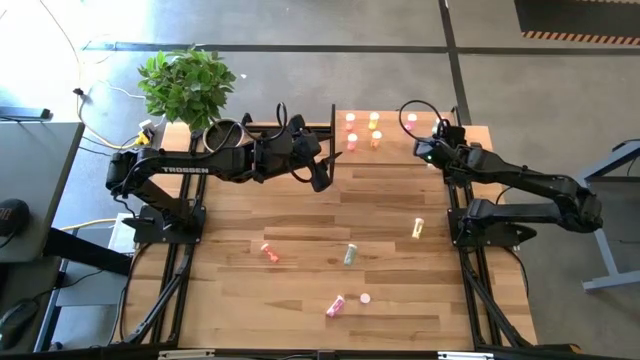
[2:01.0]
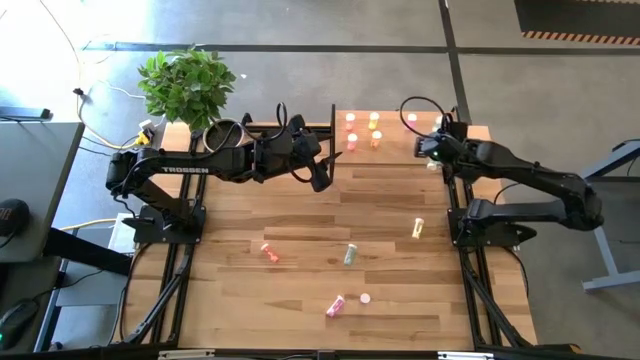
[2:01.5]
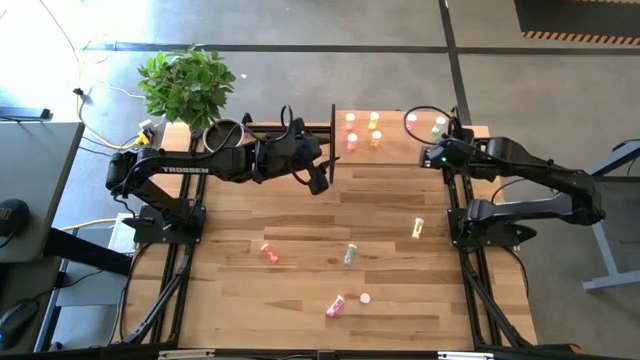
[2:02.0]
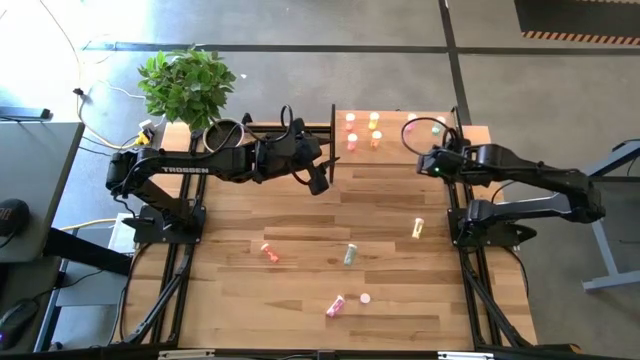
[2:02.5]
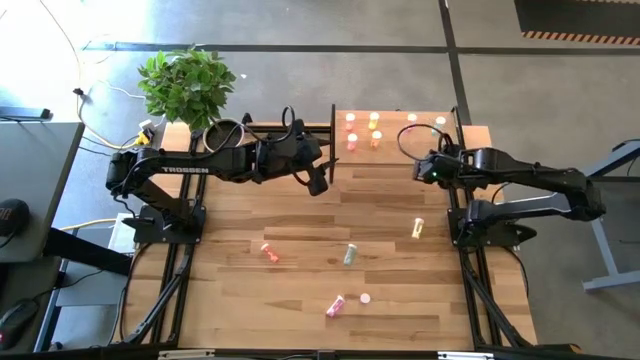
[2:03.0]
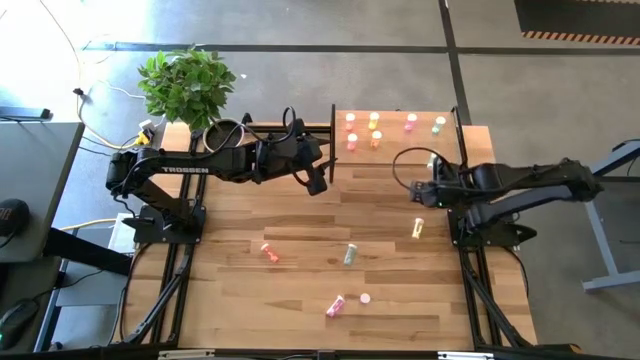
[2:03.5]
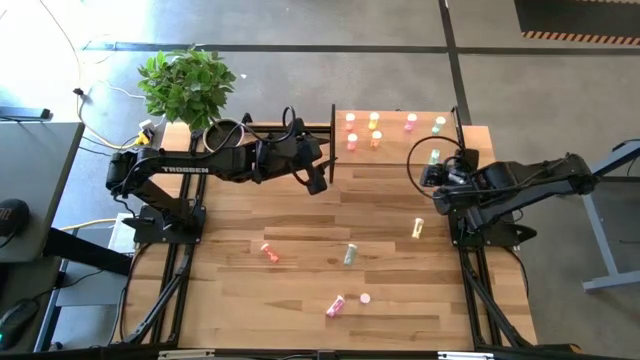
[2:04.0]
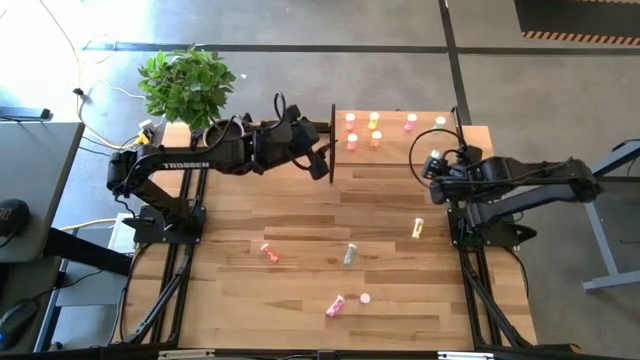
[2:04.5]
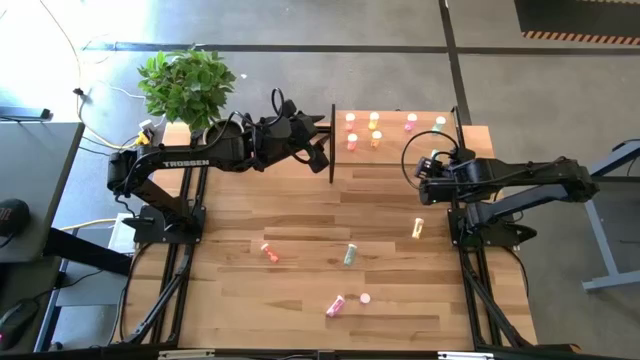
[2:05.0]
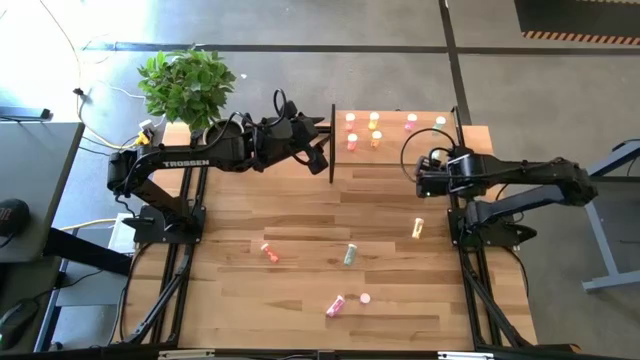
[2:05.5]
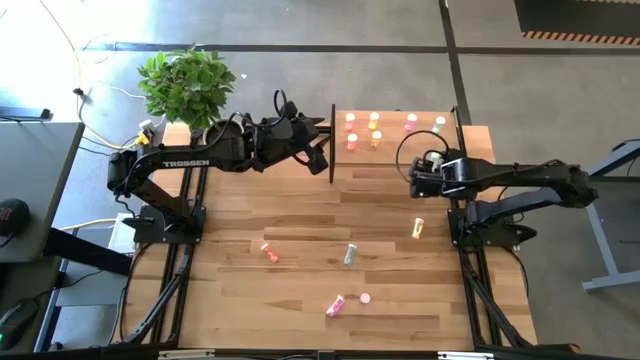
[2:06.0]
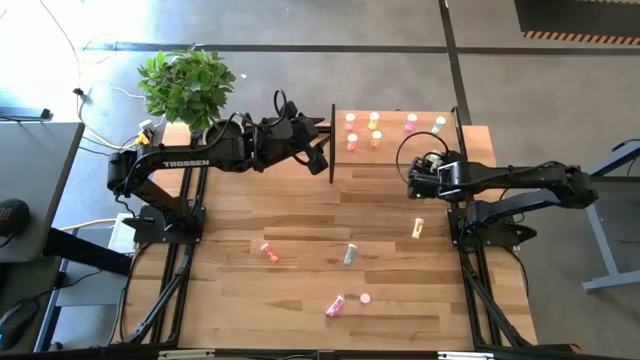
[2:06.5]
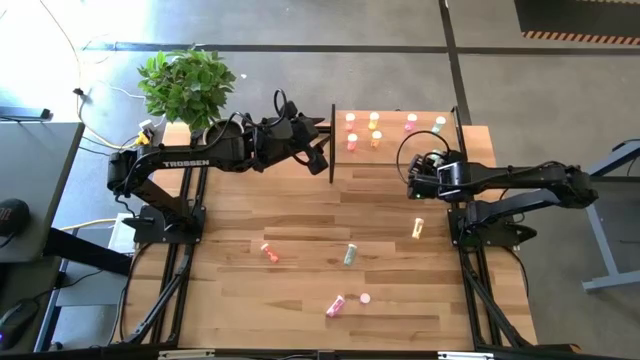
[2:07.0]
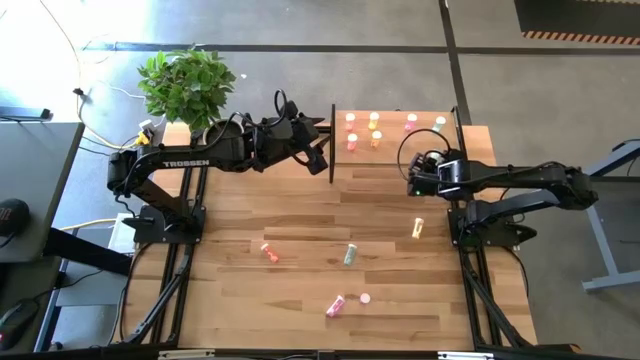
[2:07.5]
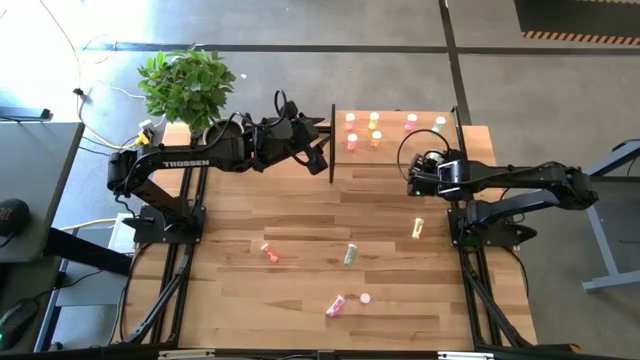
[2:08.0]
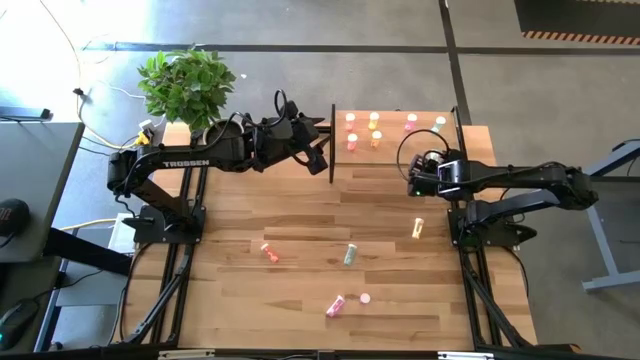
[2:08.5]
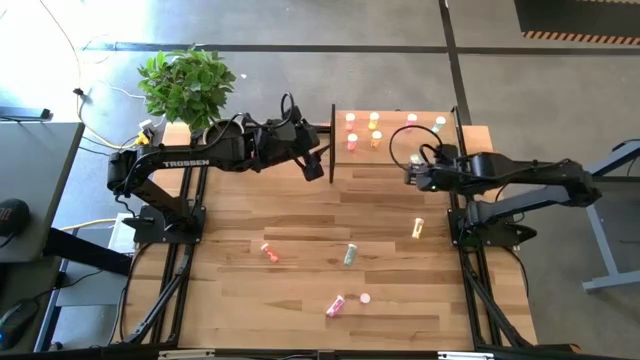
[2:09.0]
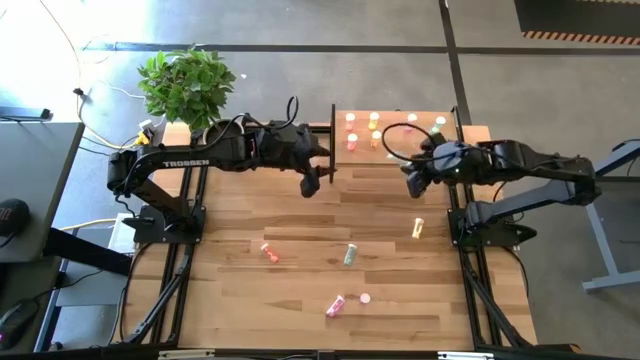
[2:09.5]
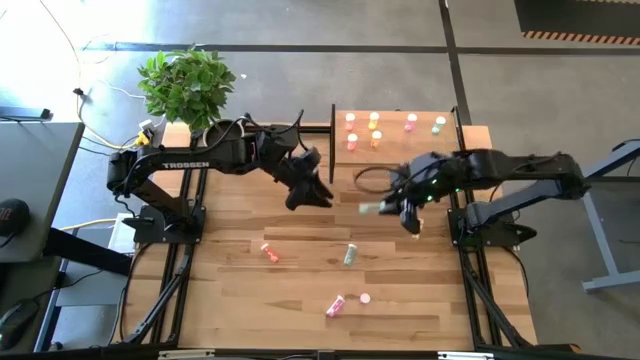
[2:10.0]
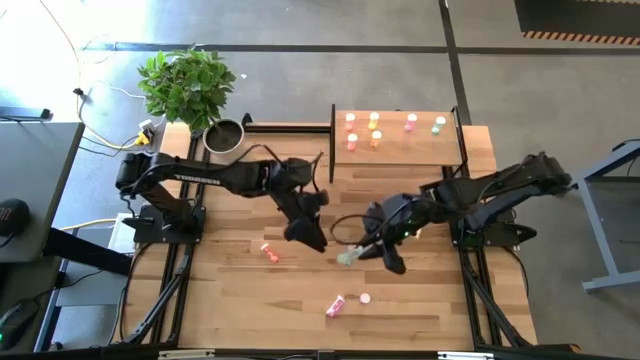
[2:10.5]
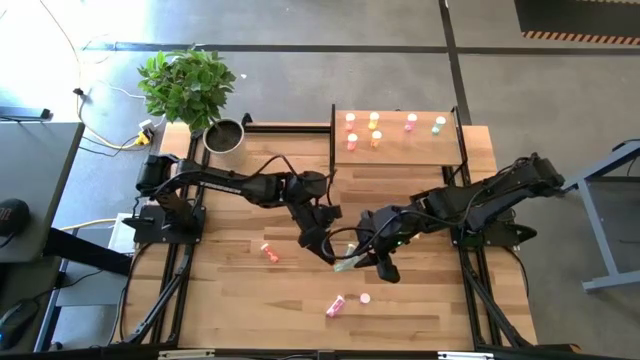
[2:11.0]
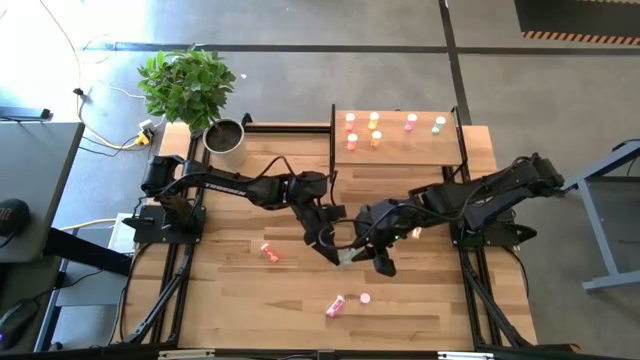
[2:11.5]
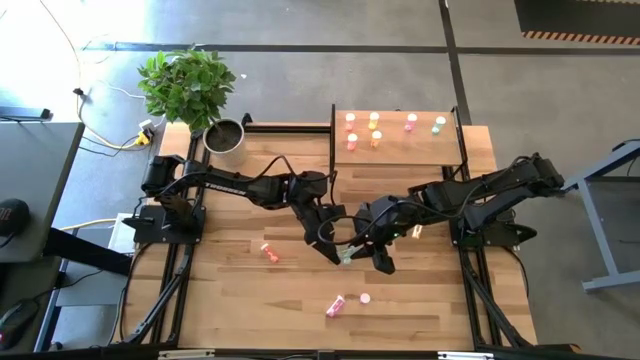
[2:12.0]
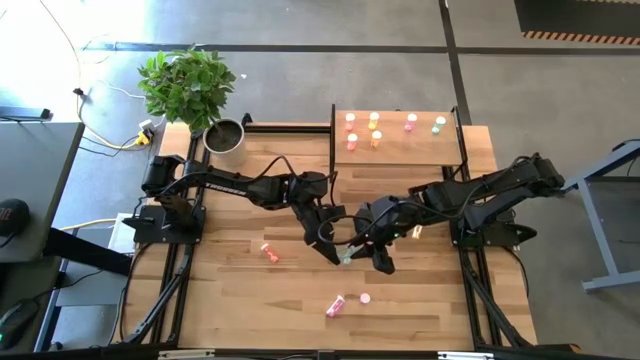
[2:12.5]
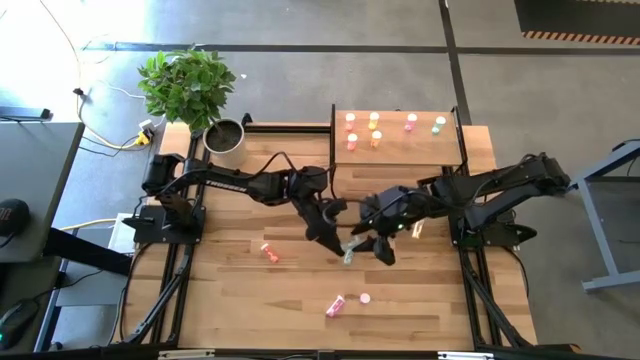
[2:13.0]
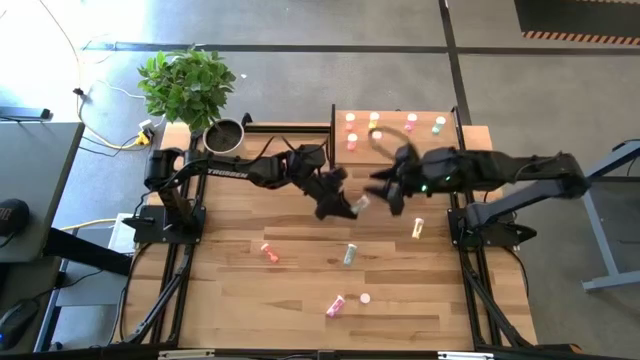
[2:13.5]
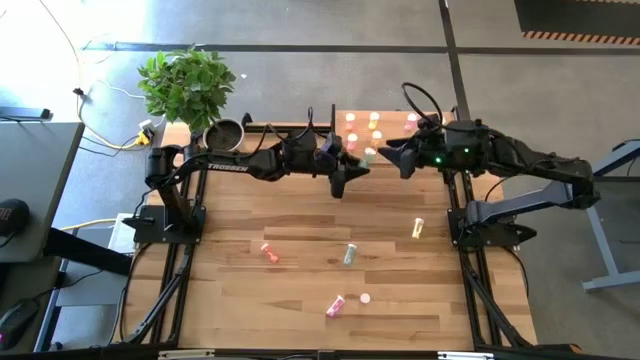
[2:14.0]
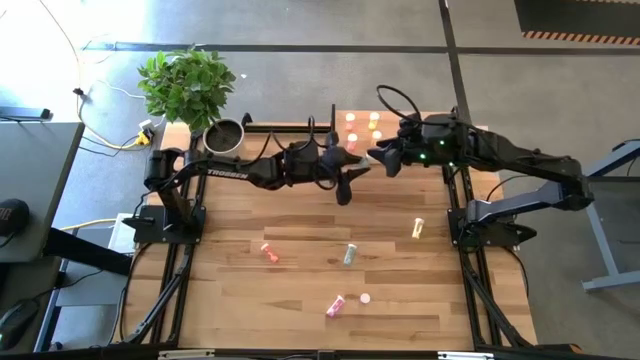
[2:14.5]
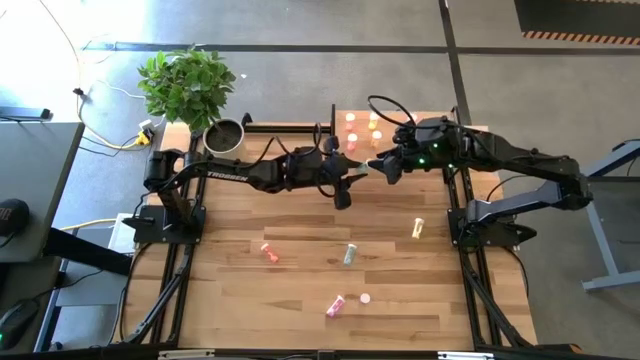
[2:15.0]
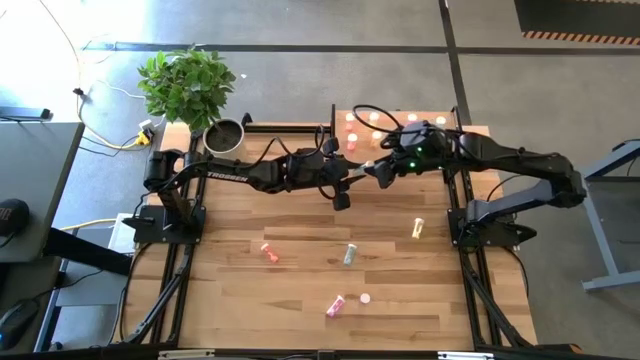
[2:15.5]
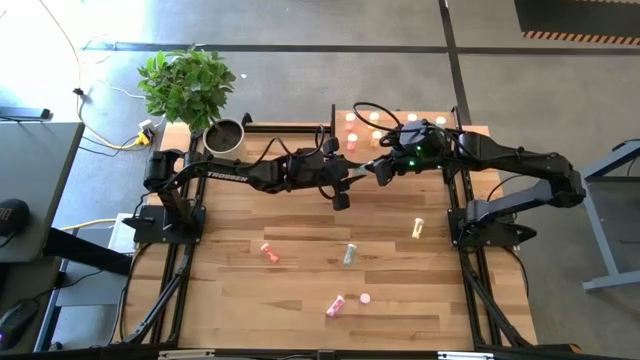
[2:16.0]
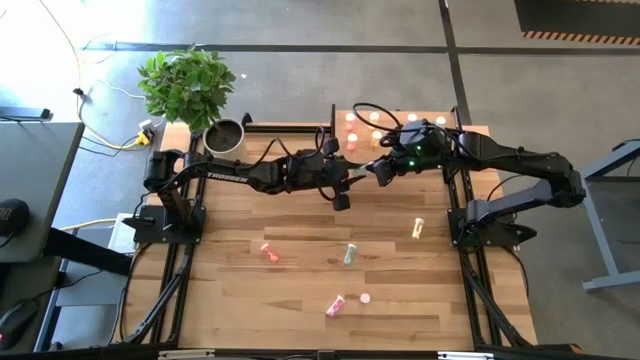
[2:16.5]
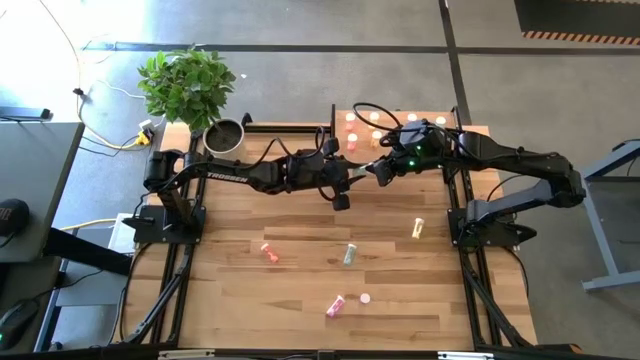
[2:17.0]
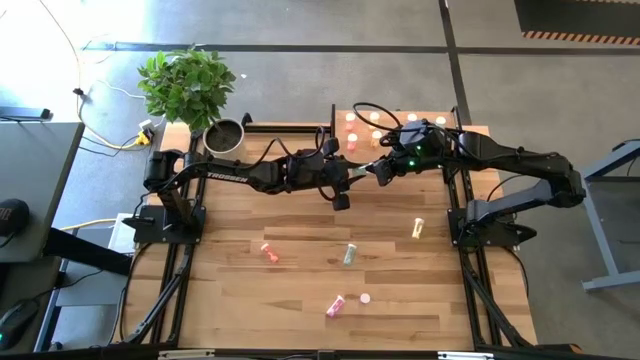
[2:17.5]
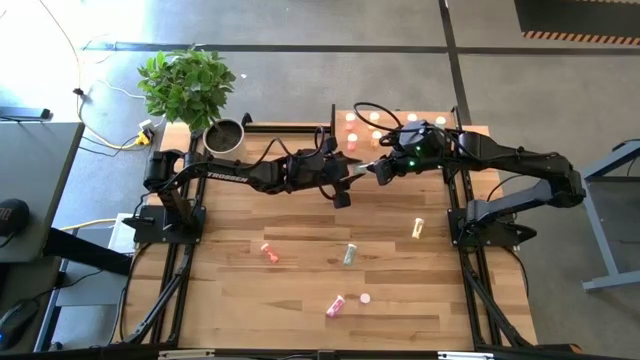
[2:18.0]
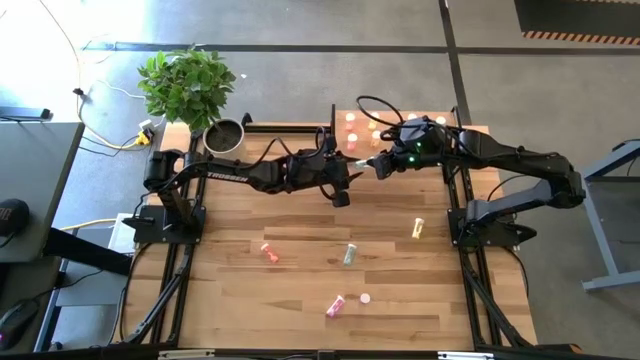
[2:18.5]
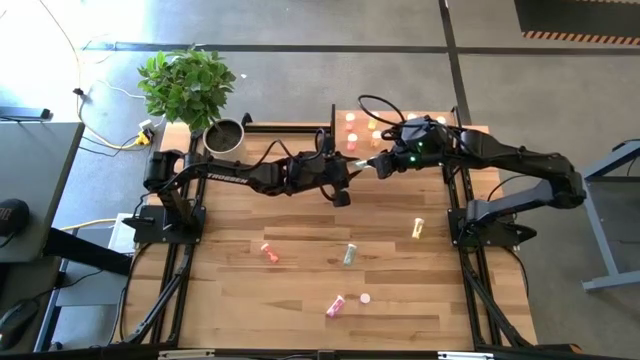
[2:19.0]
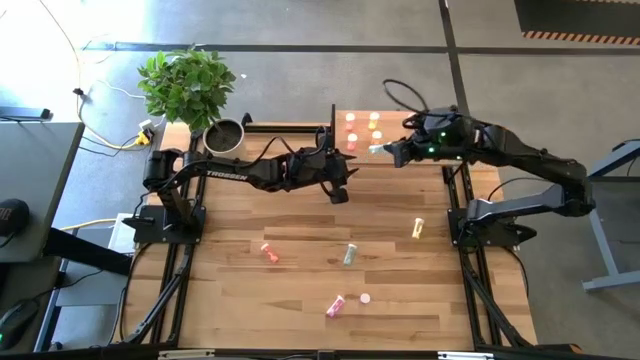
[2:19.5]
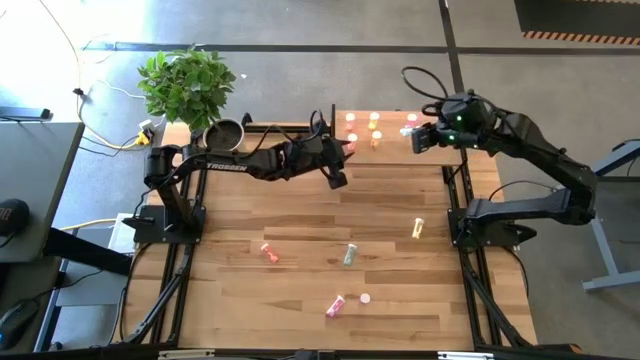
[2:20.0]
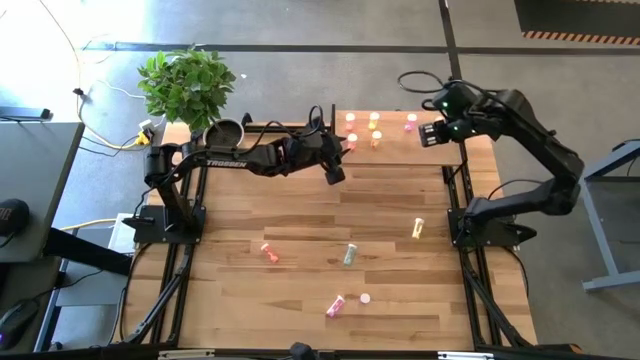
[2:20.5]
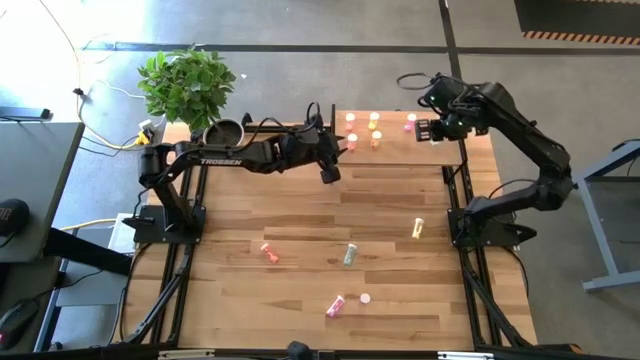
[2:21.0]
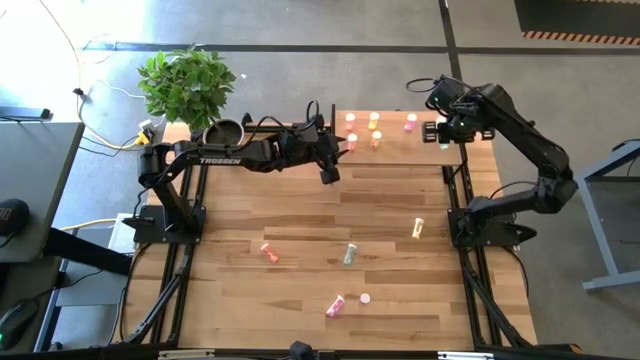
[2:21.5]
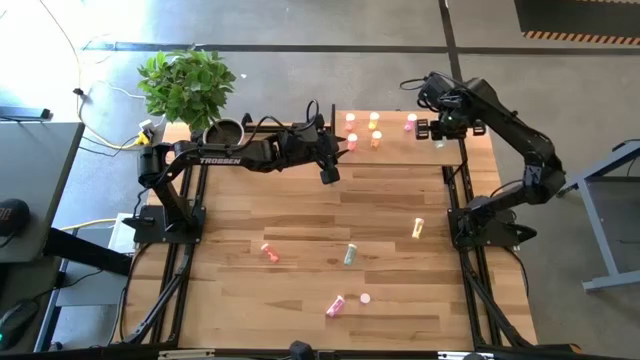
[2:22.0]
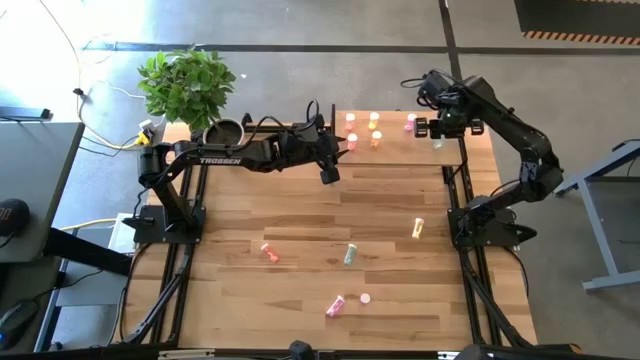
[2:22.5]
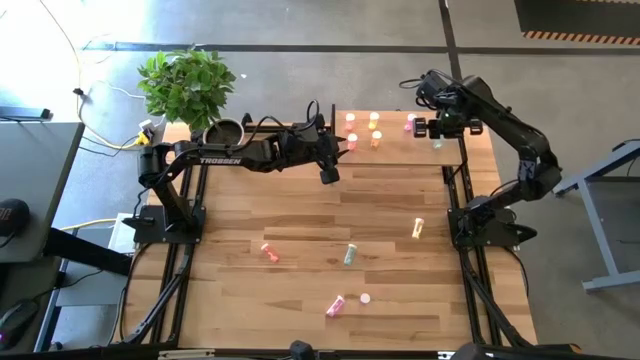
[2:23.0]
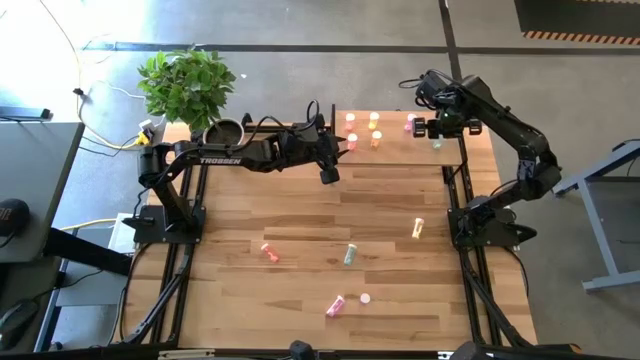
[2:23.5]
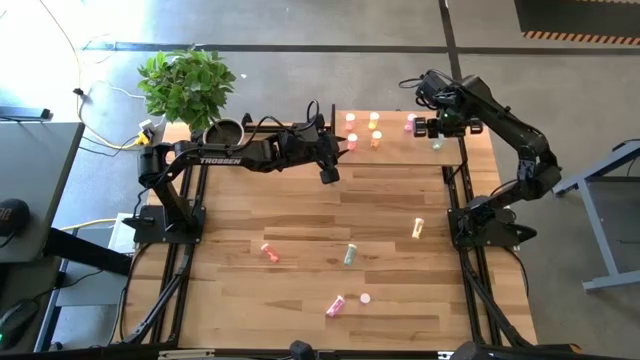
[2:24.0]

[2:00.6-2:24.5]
Task: Pick and place medicine bottles onto shelf by color
Put the top blue medicine bottle aligned with the other blue medicine bottle on the shelf
